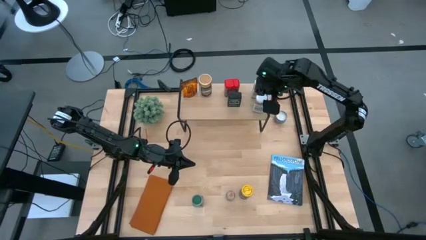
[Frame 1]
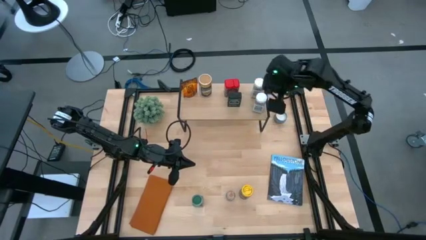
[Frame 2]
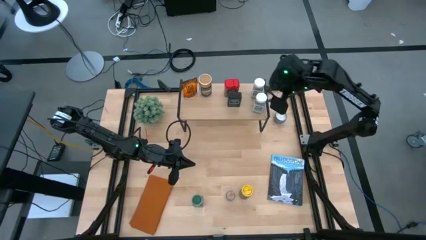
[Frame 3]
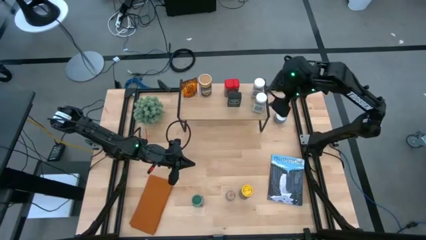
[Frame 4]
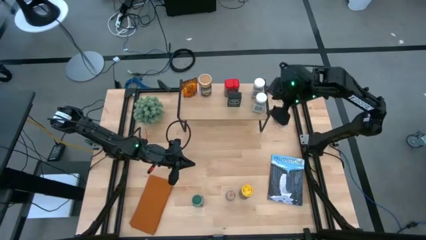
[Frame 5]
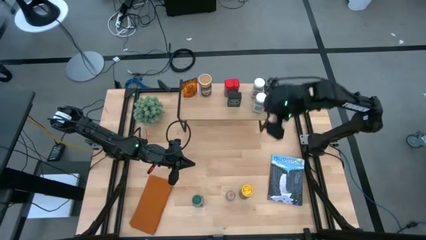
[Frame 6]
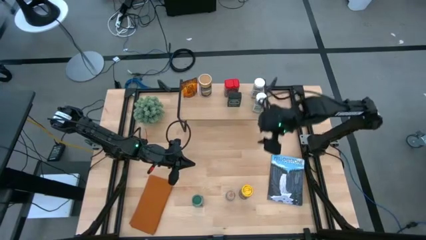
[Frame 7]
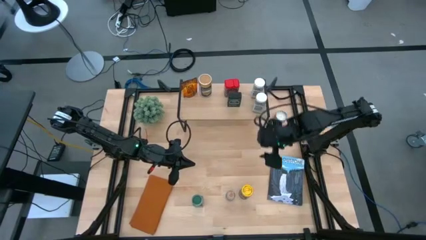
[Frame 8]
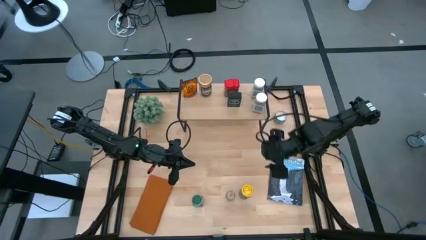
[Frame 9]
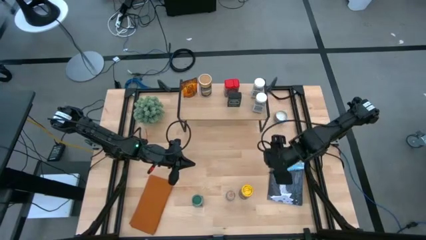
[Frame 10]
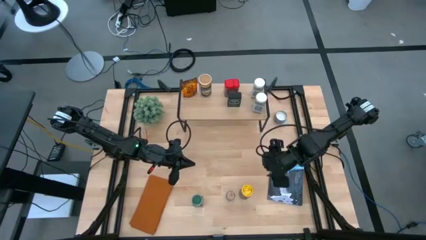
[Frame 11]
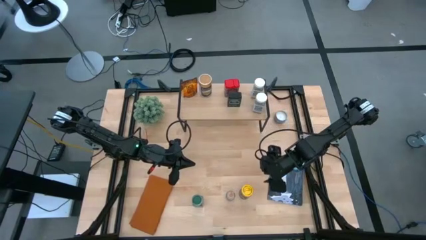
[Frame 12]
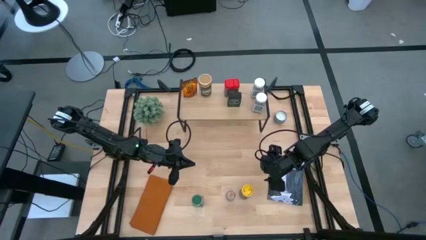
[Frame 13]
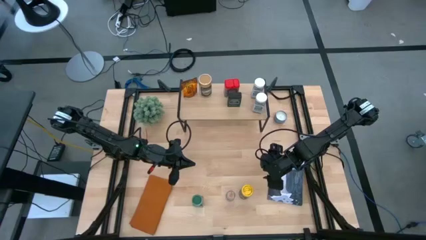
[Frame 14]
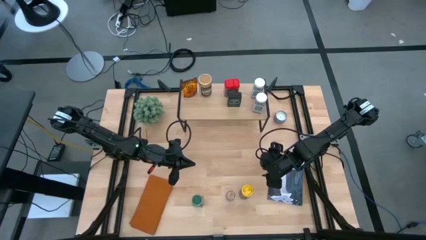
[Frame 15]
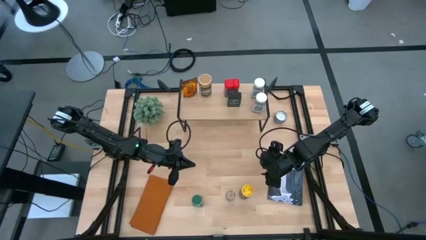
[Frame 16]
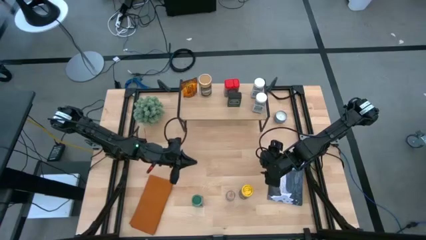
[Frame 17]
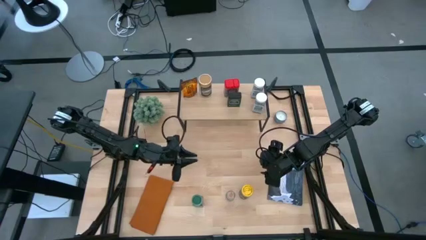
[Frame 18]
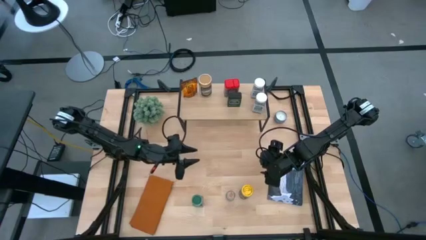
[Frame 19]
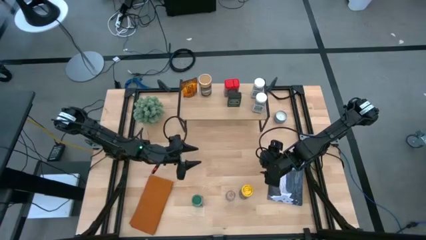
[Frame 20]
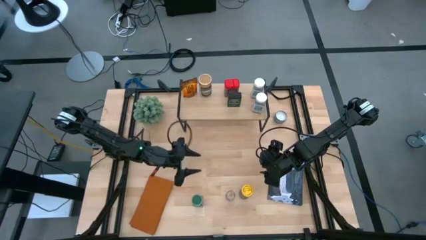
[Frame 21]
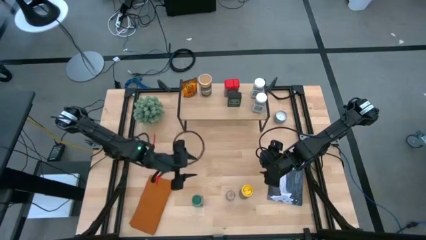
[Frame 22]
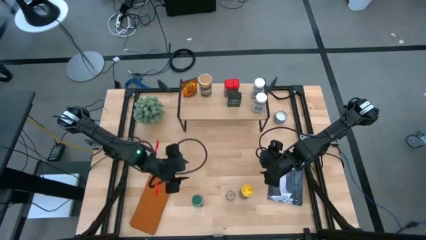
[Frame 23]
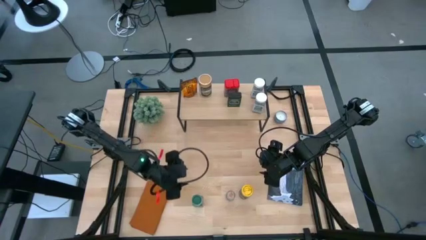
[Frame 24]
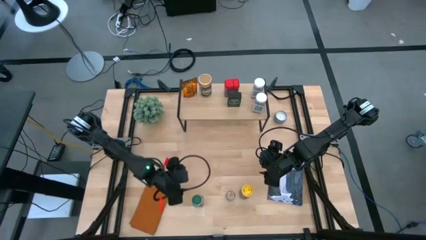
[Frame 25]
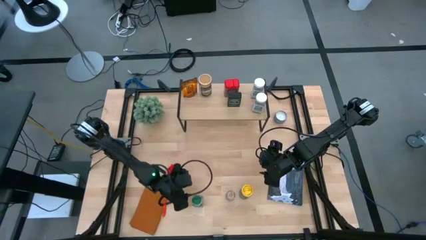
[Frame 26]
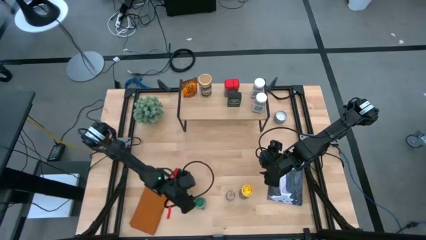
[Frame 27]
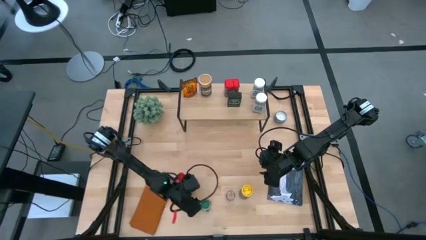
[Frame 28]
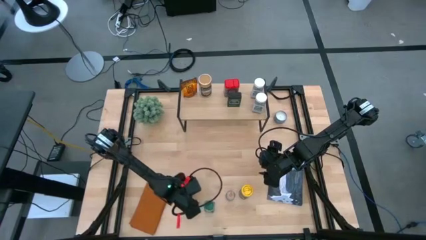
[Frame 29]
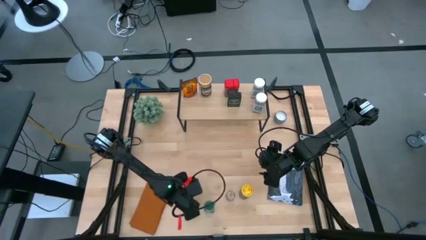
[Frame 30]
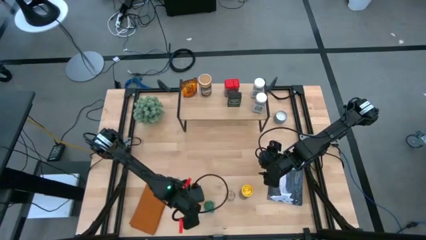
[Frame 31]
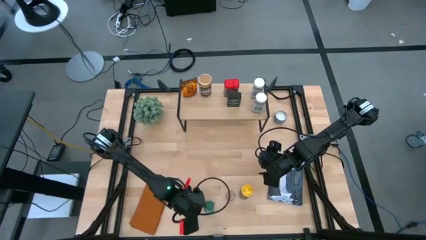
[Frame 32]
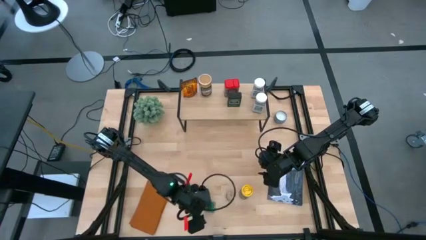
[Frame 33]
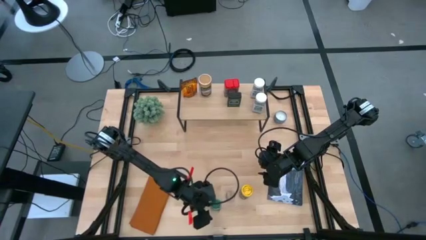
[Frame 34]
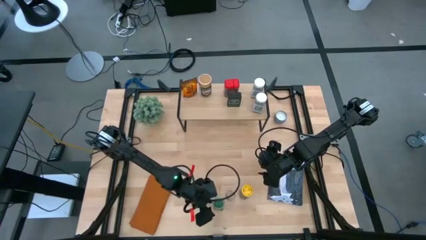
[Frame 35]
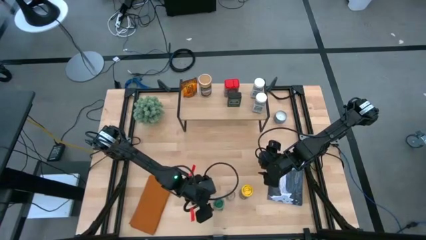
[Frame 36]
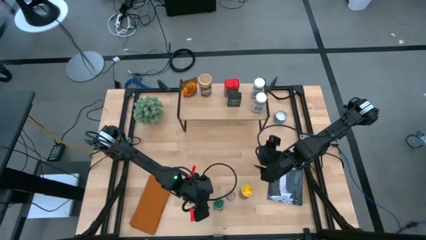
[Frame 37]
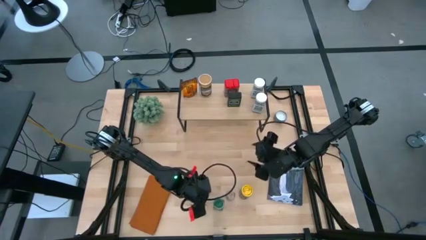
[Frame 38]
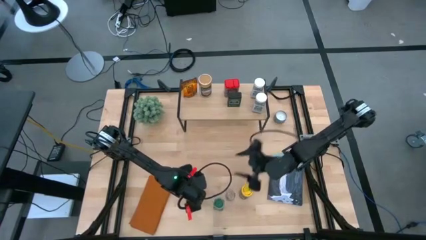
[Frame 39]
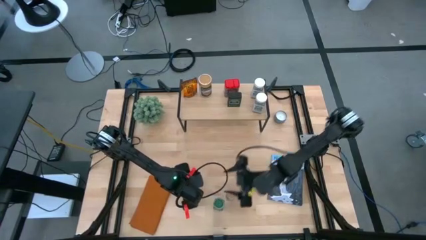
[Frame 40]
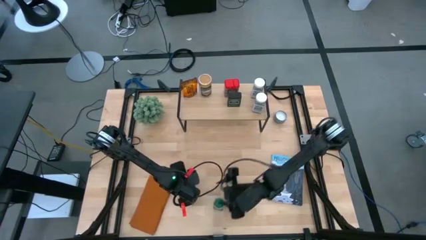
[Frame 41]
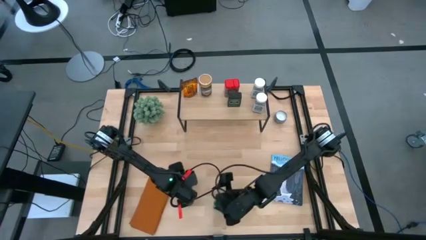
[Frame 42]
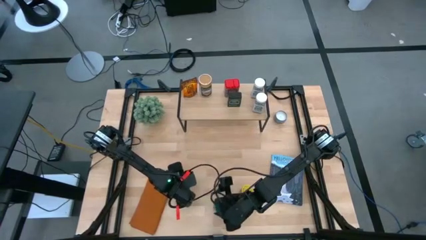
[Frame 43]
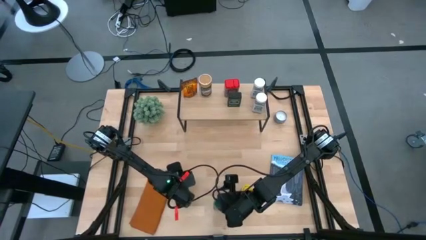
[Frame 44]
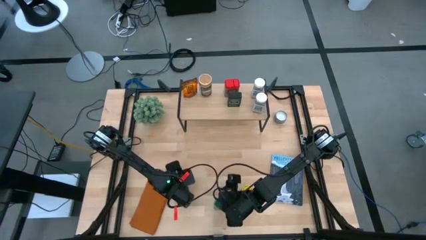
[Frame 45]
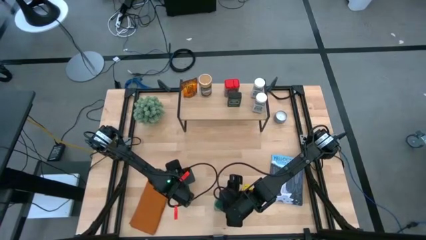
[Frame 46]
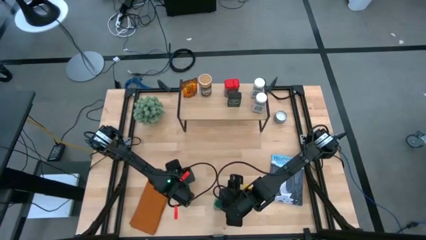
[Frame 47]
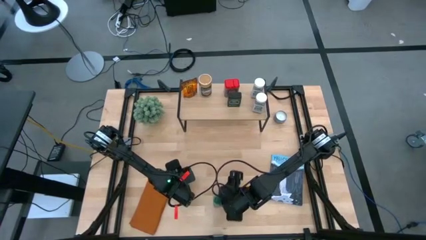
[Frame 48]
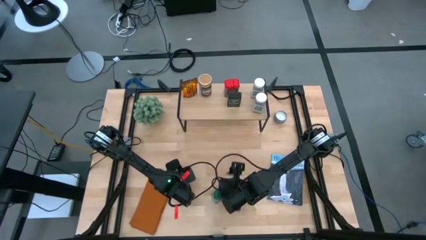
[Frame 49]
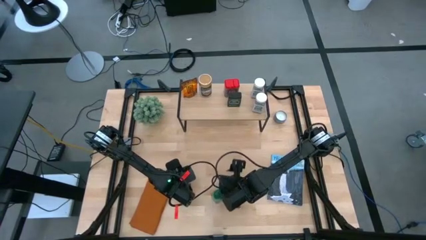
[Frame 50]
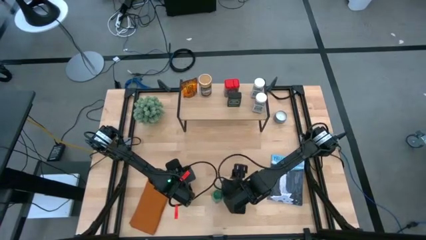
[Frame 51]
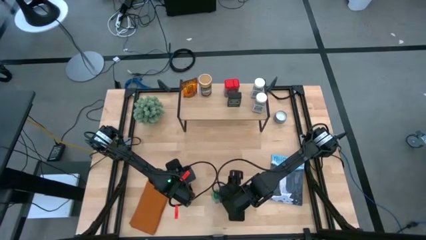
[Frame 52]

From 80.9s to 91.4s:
Task: Shelf spices
Put the green seasoning bottle on the shelf
